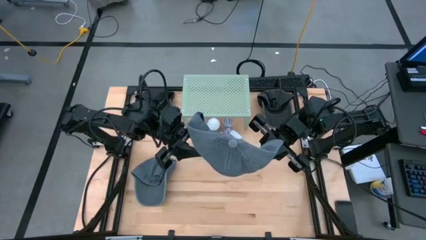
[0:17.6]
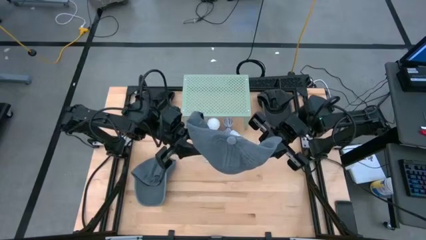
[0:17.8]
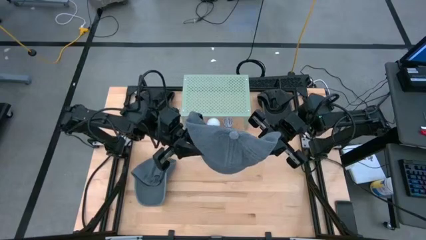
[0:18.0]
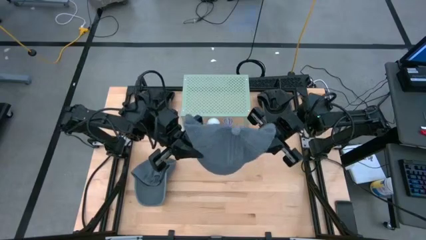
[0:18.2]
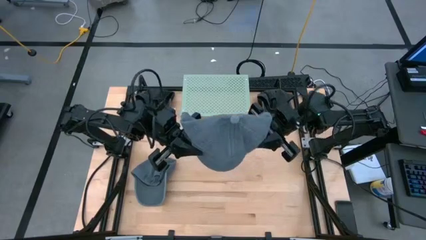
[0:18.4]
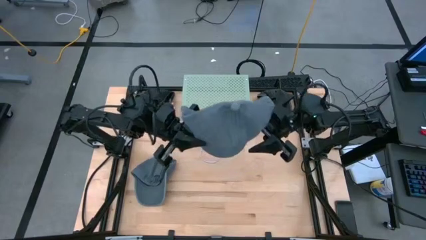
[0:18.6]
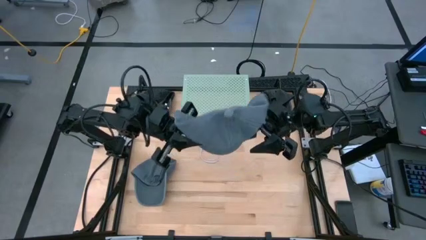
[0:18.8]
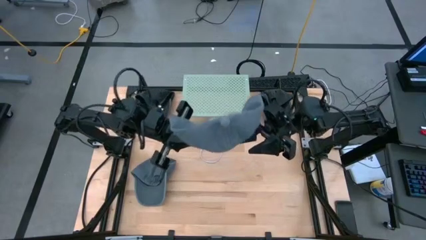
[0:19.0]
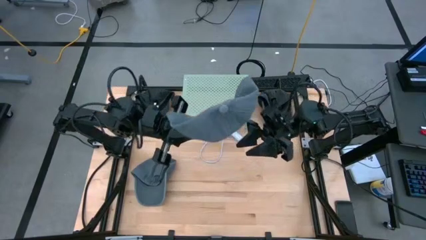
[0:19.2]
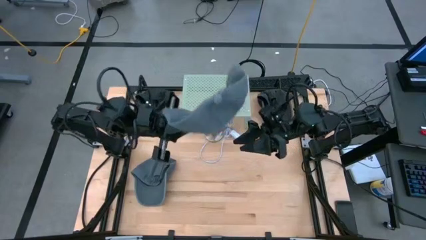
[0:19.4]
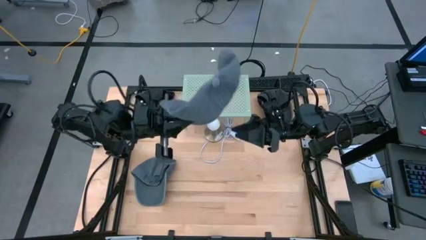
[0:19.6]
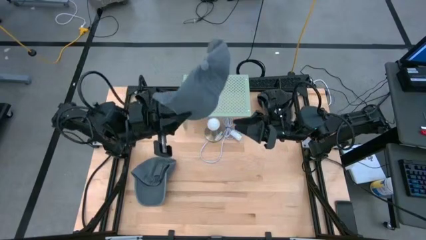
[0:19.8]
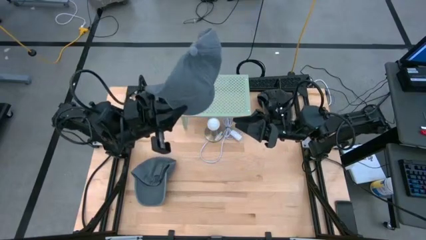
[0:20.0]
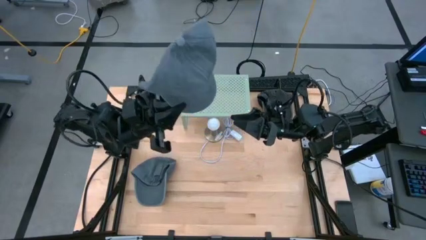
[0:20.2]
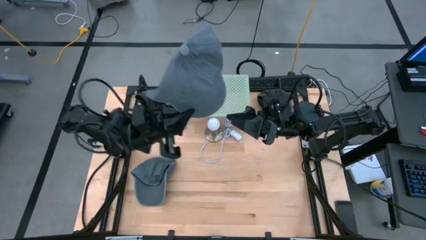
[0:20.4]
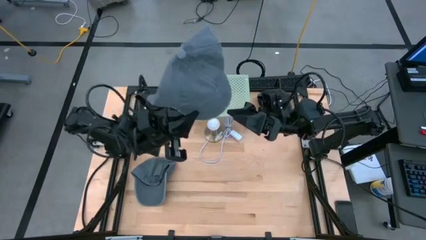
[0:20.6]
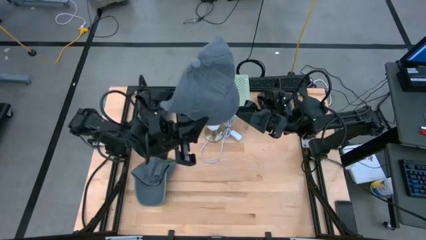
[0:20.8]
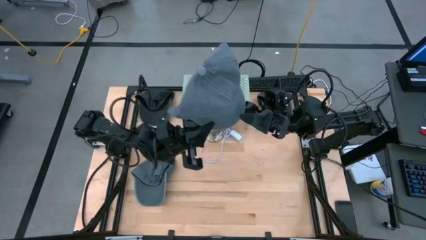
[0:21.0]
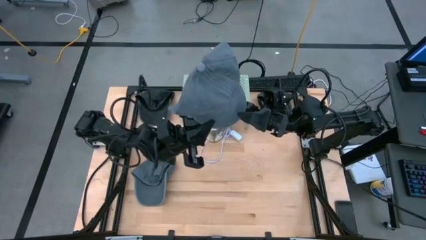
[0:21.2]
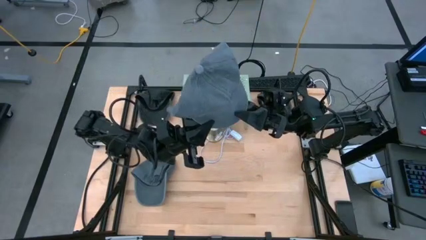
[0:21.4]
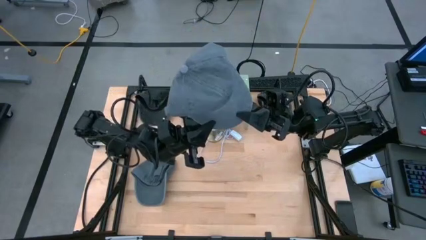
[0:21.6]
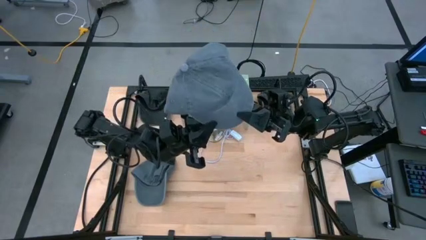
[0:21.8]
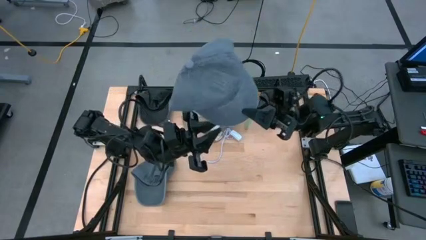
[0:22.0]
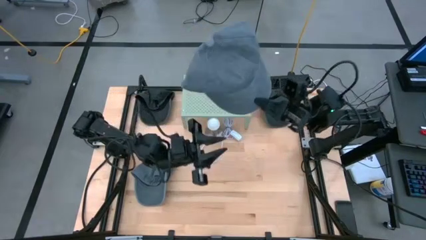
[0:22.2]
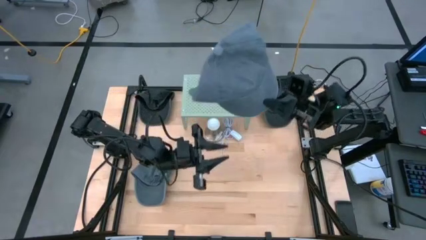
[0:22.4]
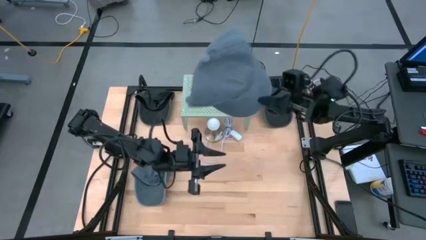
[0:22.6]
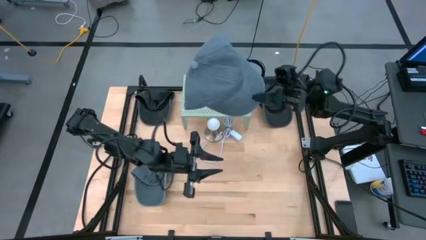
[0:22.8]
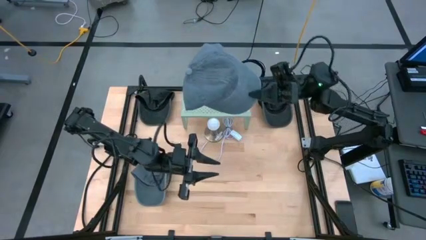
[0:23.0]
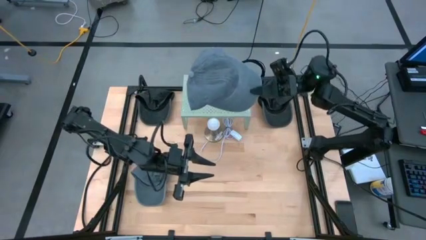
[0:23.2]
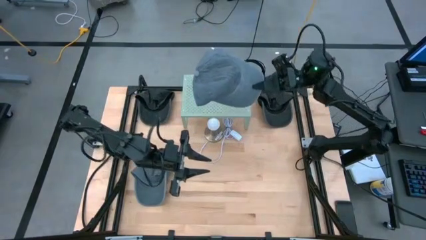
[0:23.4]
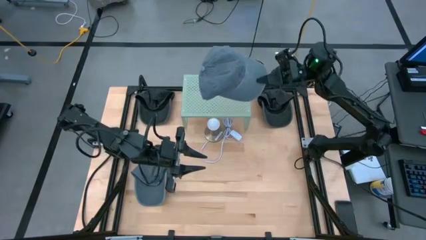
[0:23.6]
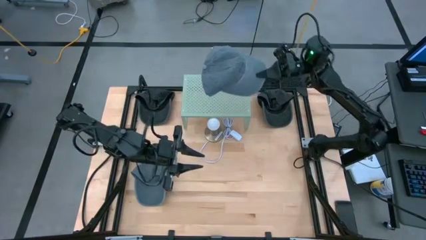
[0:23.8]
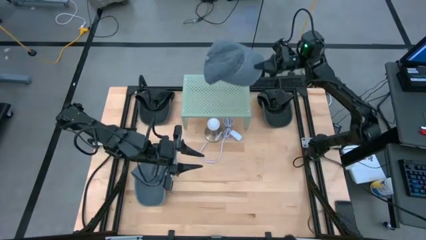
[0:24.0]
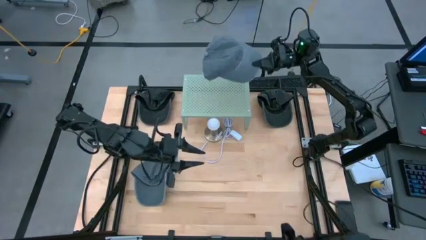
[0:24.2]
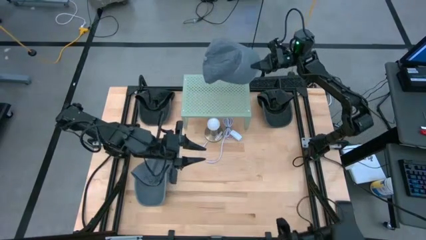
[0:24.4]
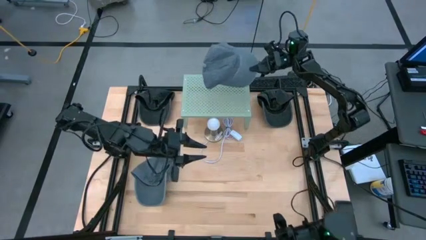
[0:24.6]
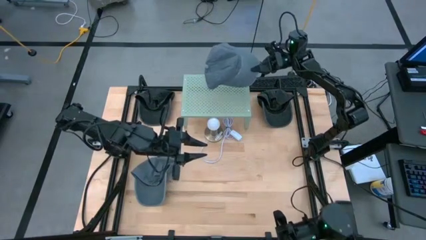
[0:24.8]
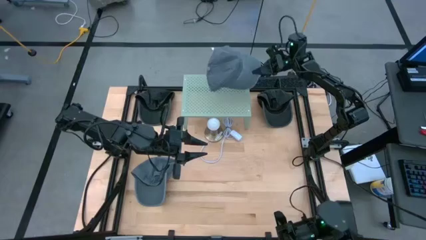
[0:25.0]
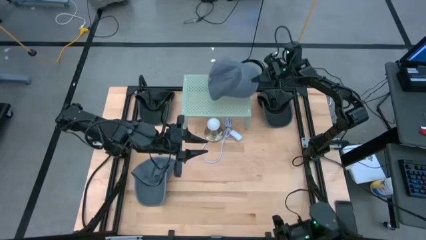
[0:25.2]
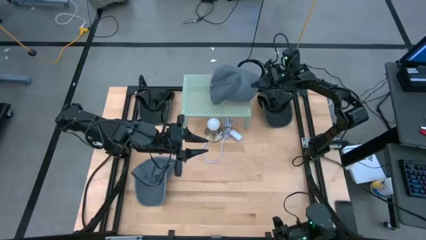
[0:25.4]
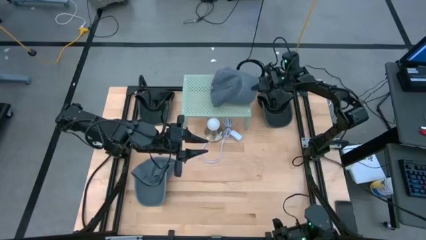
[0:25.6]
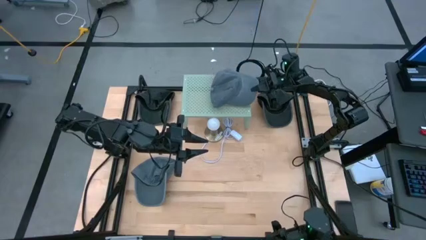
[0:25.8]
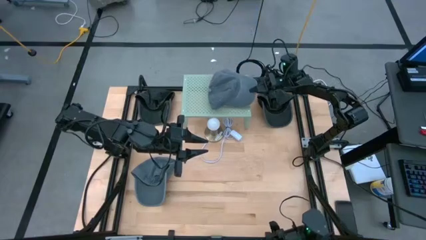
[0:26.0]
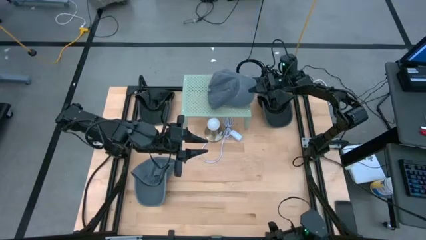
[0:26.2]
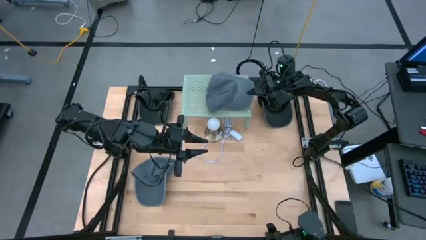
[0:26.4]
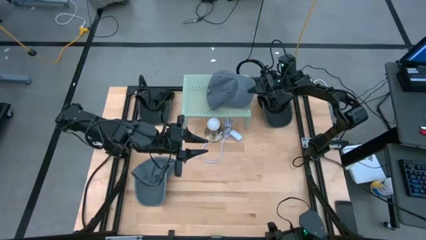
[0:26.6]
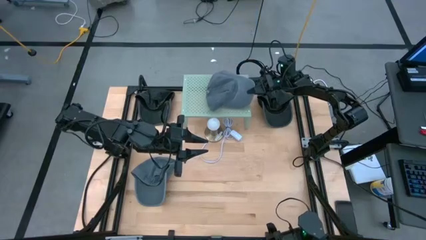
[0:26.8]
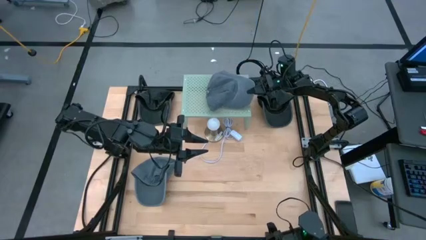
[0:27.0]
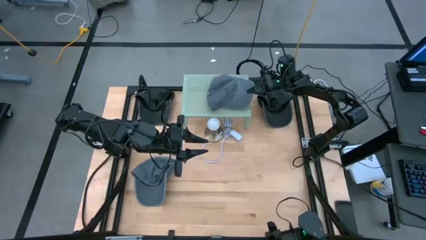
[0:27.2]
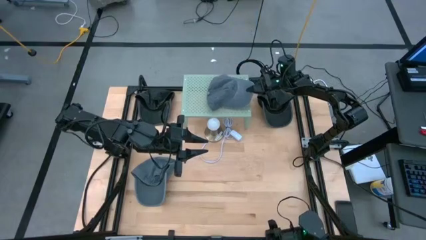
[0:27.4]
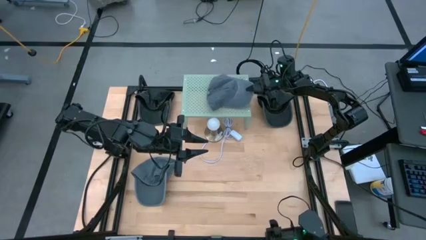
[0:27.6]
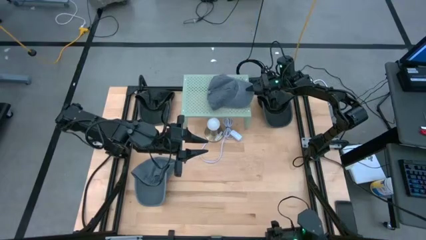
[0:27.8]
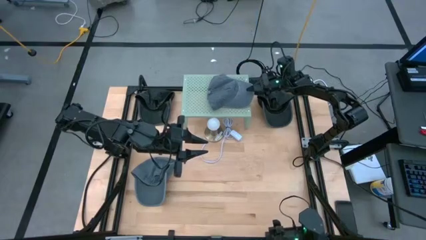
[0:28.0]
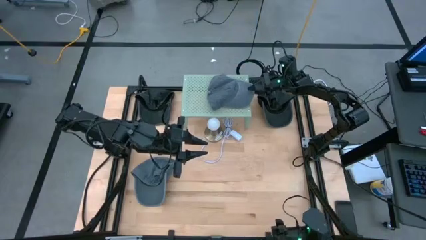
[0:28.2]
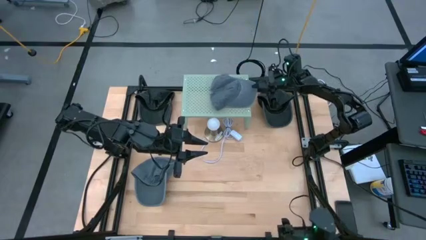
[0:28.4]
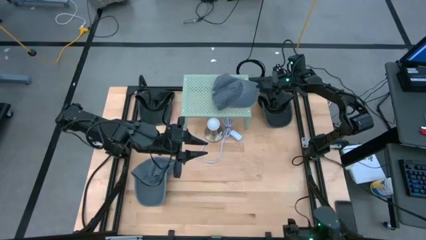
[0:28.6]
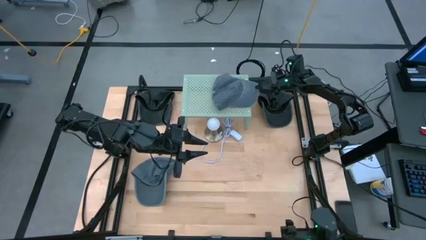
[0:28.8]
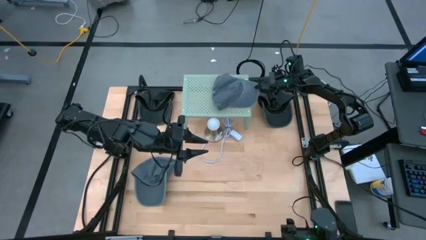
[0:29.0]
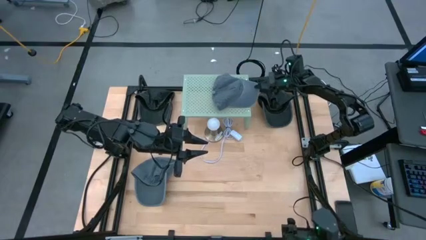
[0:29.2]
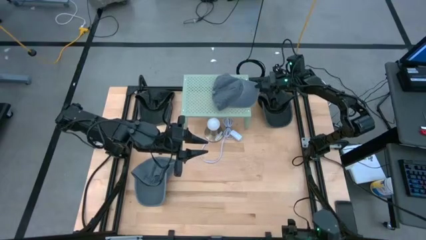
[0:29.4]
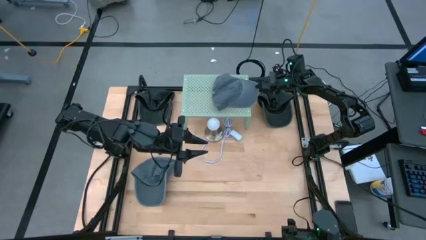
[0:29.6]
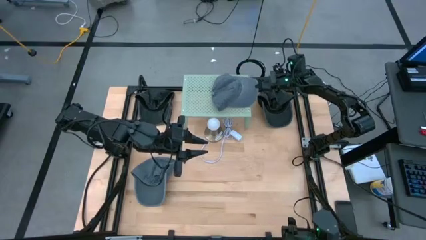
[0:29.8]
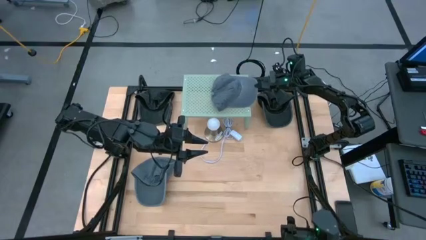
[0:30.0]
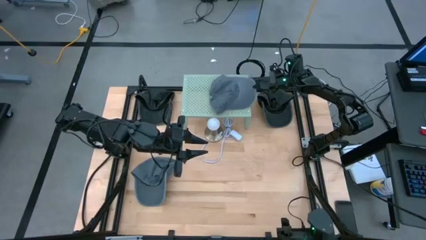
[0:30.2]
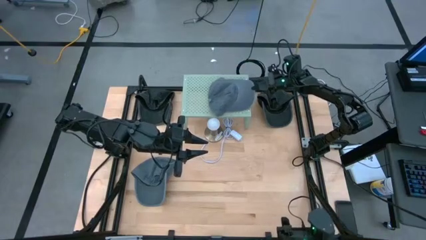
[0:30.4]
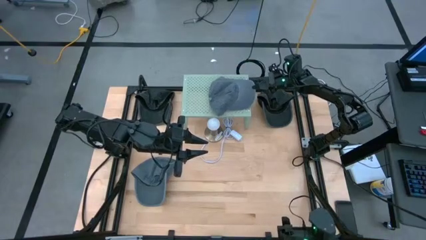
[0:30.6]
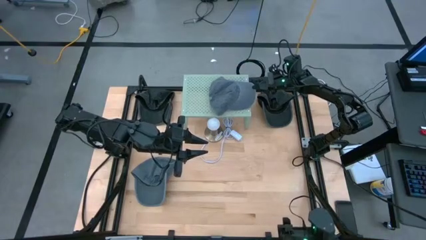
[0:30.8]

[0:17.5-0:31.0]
Task: Pick & Place hat
Put the right gray cap on the shelf
